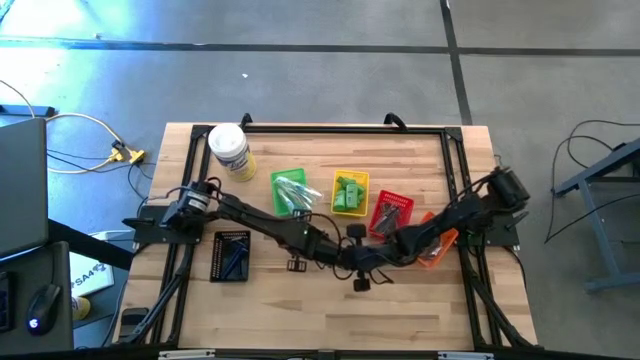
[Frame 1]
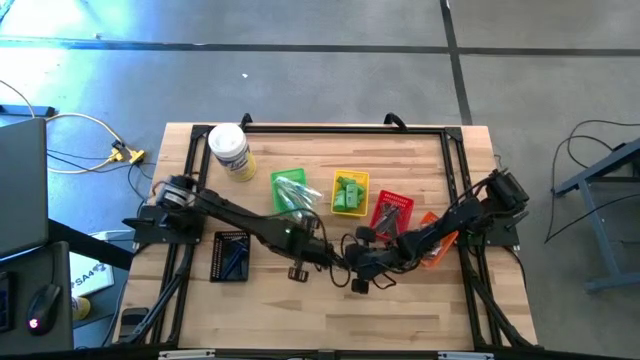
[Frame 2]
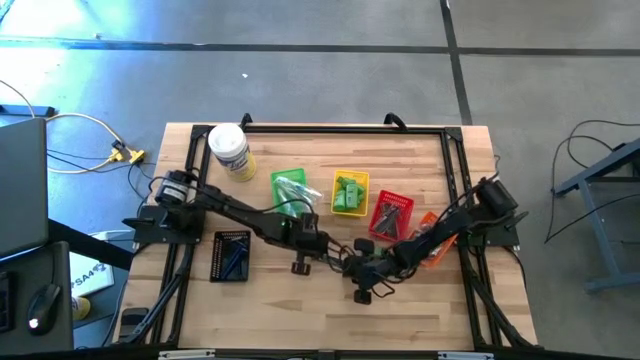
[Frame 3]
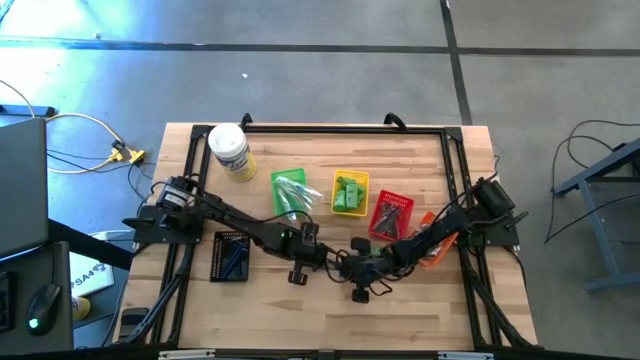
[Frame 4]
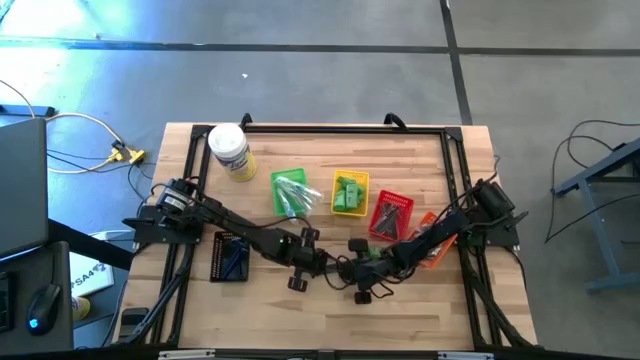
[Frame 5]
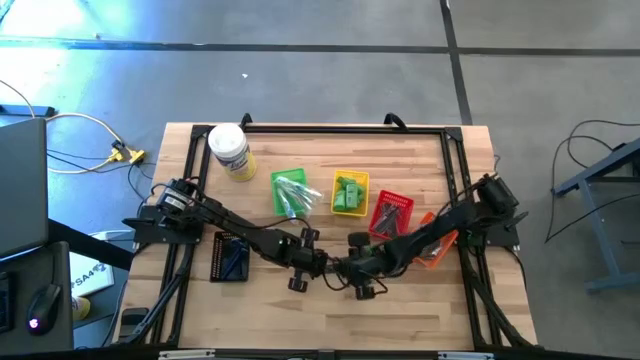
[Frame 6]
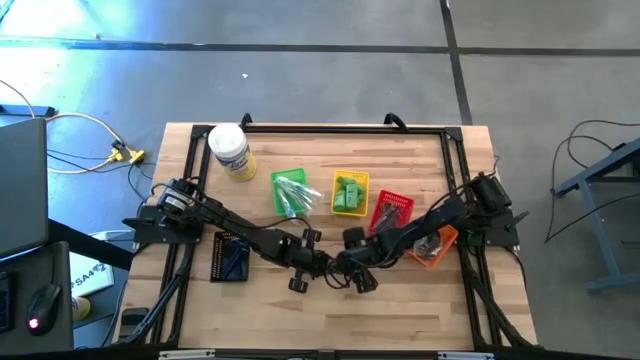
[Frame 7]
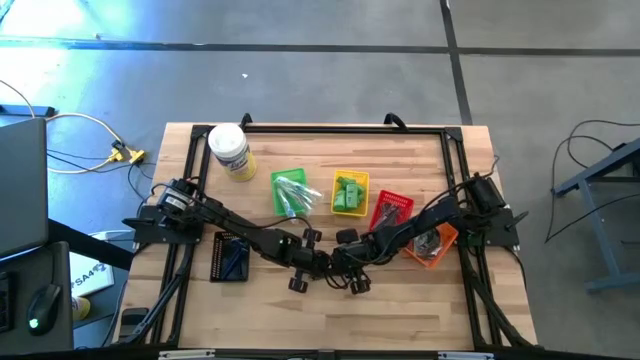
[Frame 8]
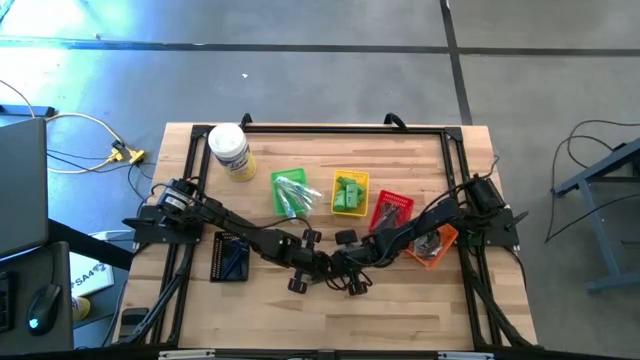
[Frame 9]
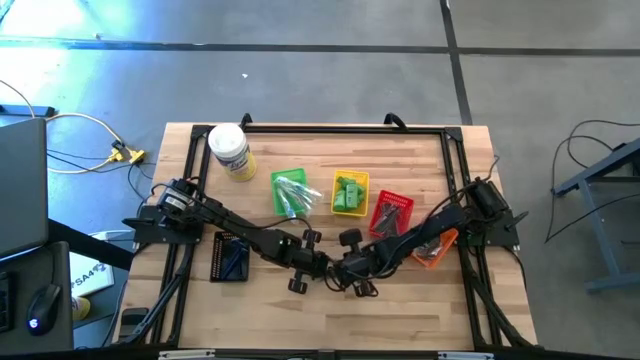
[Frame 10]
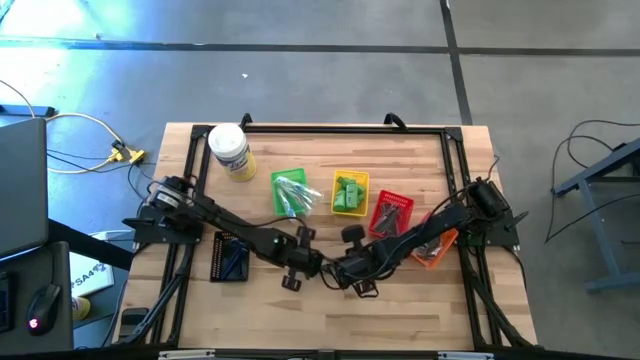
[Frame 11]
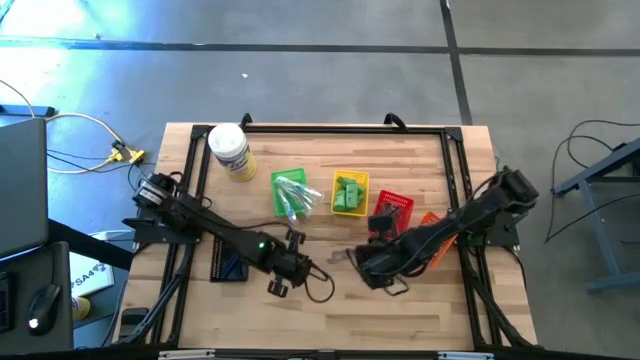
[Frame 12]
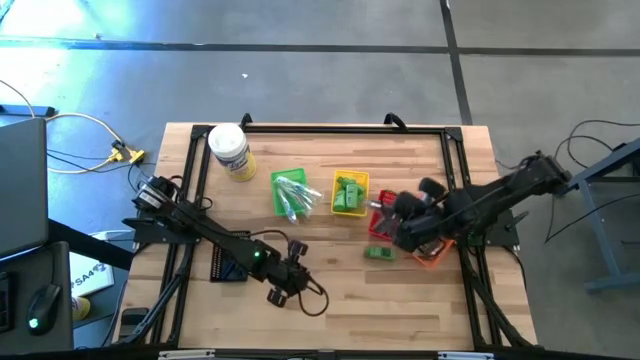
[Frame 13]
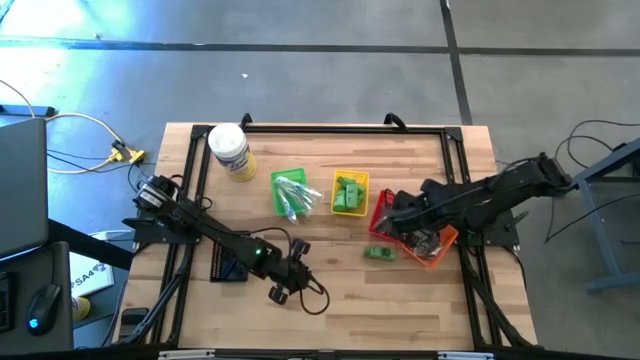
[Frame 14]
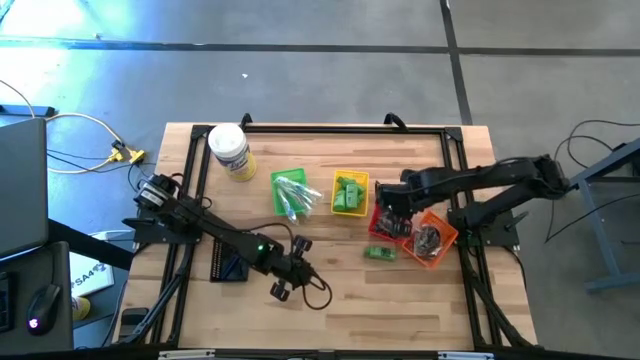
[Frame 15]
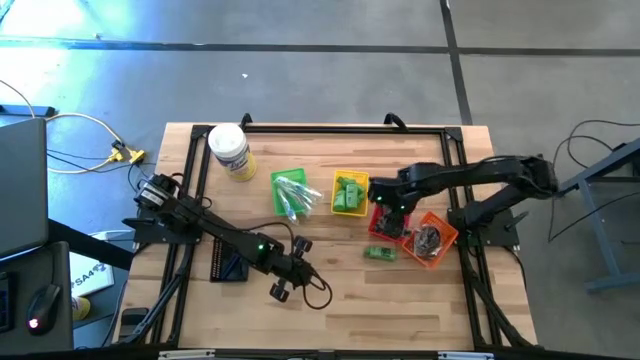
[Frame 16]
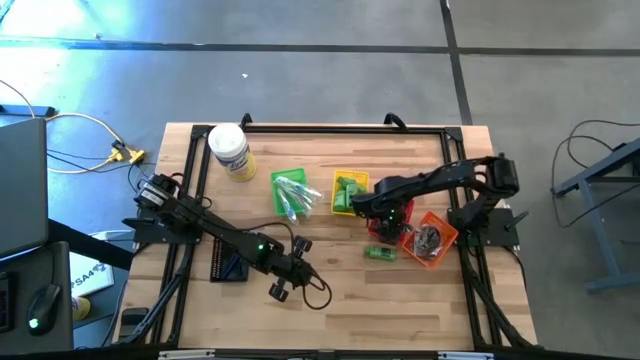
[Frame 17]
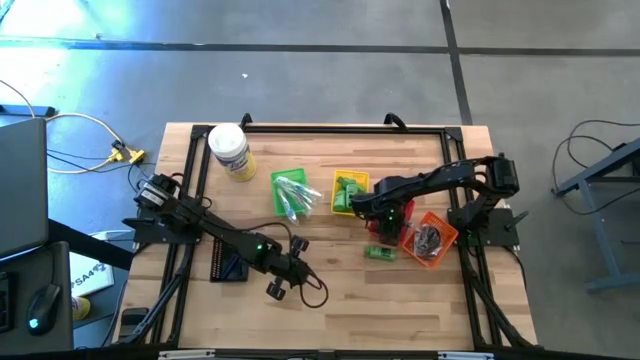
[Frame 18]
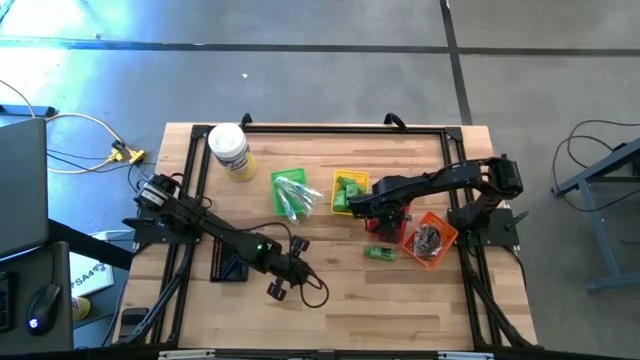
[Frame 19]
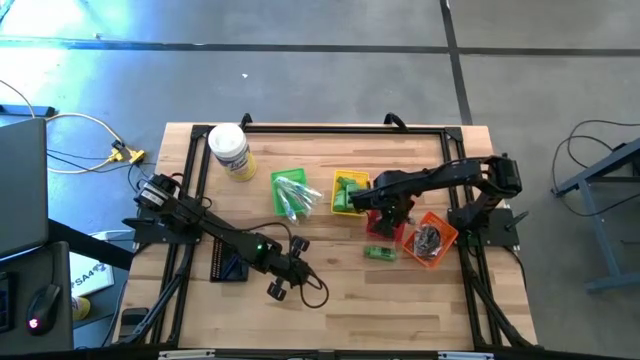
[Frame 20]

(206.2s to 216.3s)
Task: Pick & Place Travel size toiletries
Put the black hair comb into the red bin

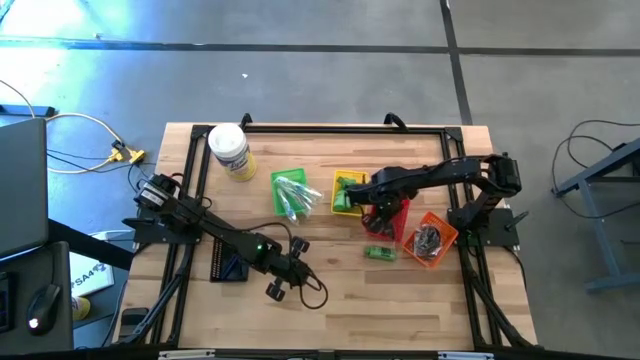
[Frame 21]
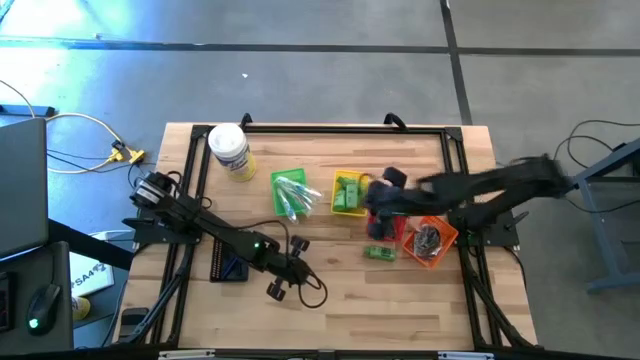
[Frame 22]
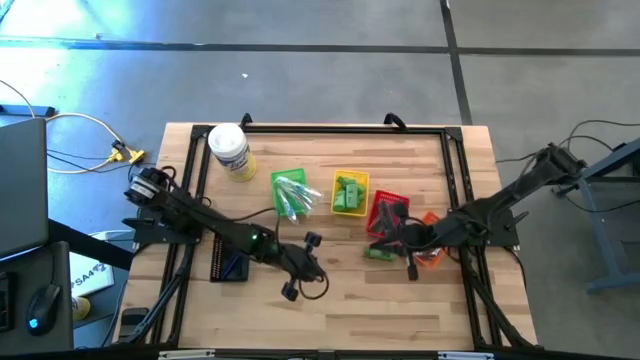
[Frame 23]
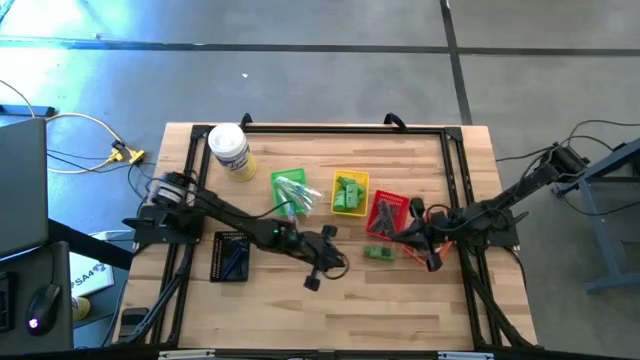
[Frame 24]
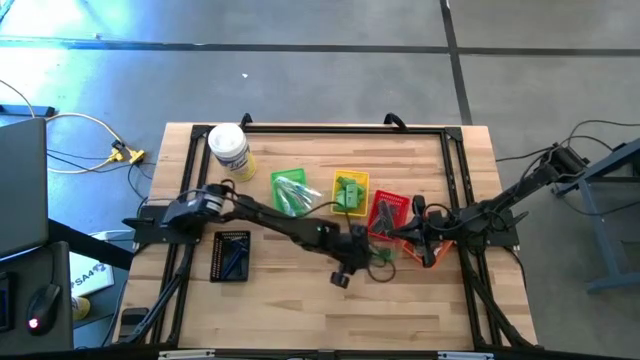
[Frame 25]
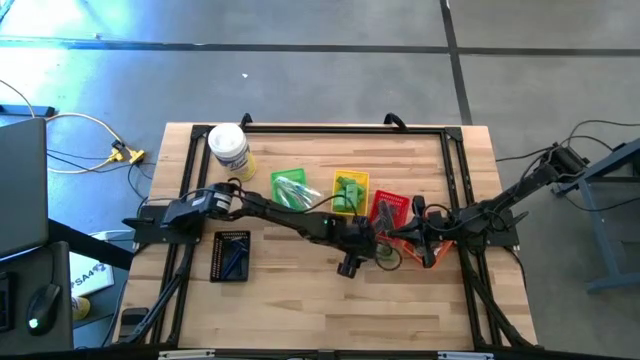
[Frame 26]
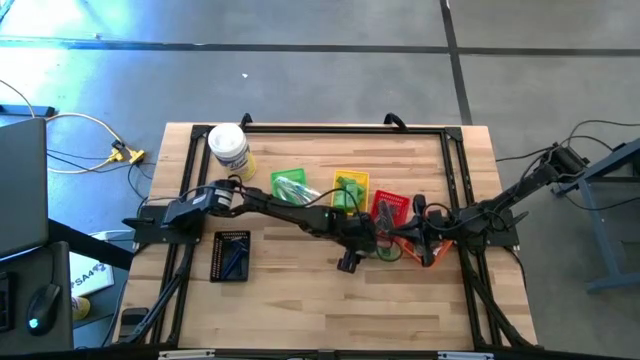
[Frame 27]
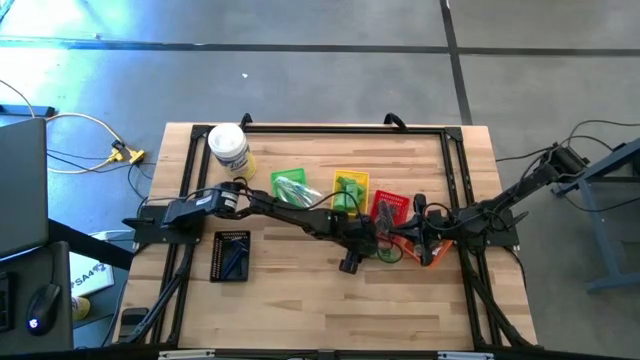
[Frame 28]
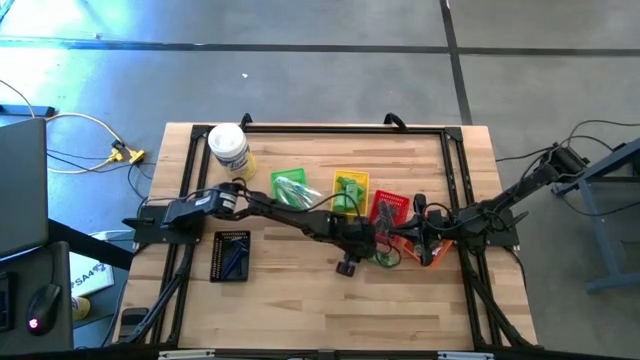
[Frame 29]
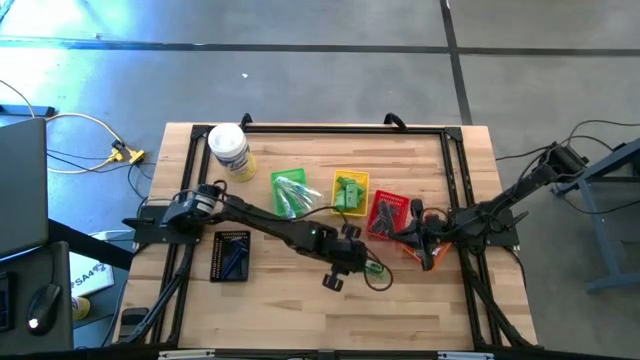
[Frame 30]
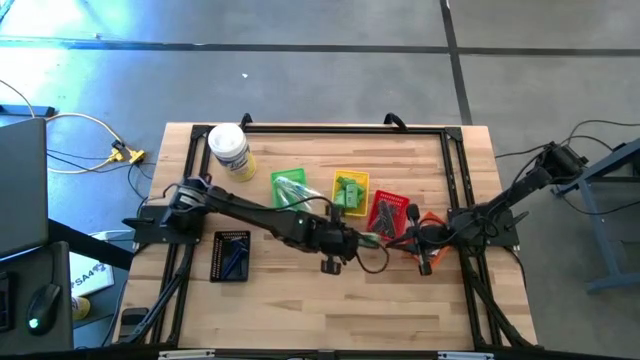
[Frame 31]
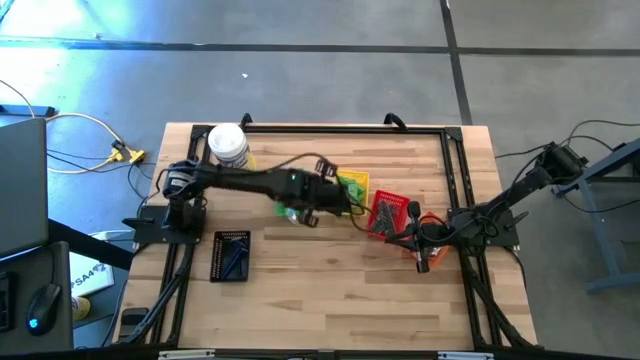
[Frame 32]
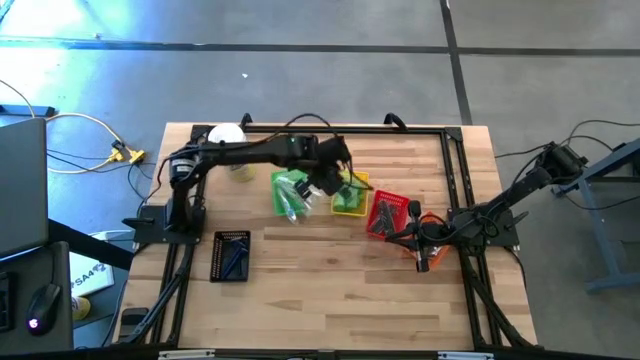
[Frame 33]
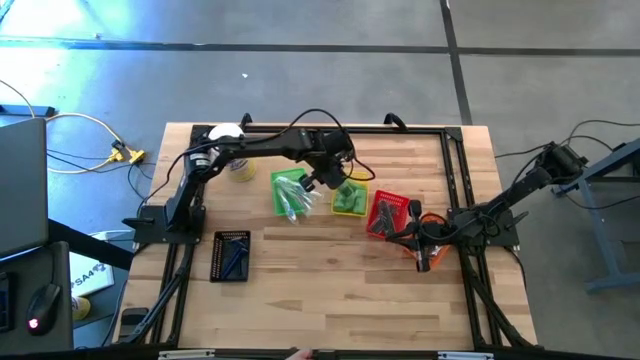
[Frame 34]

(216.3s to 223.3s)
Put the green shampoo into the yellow bin

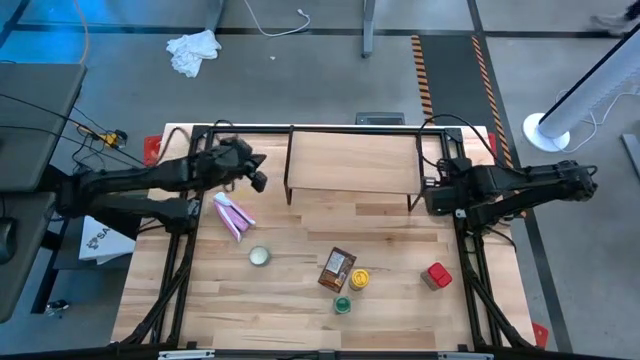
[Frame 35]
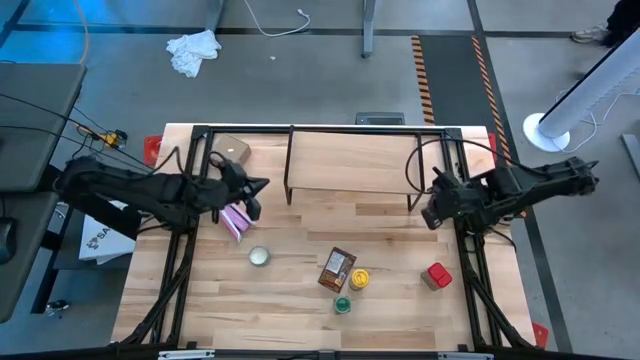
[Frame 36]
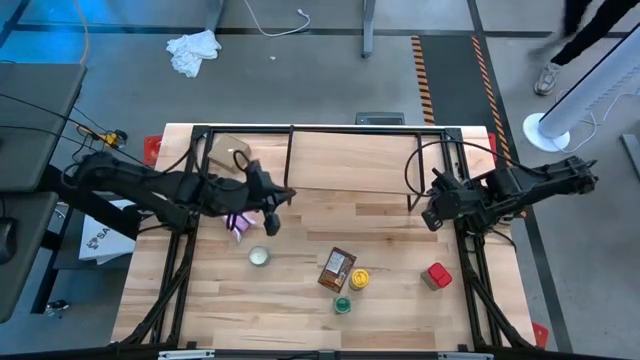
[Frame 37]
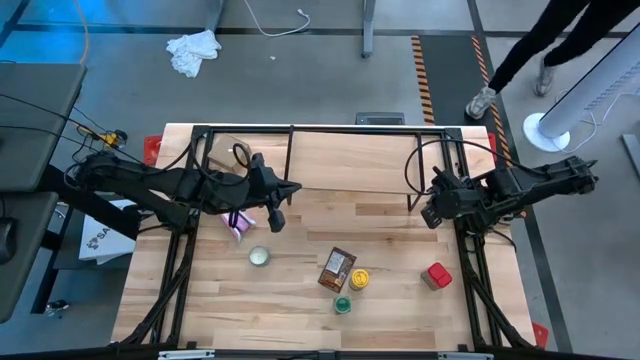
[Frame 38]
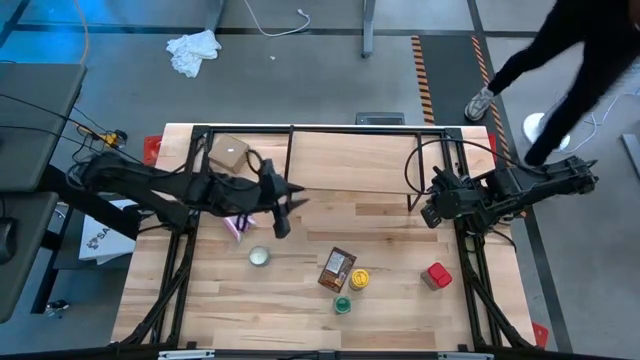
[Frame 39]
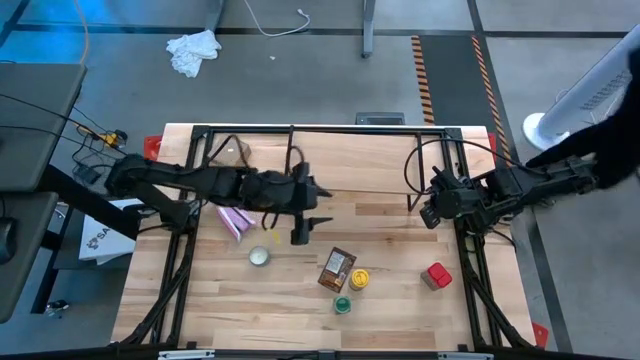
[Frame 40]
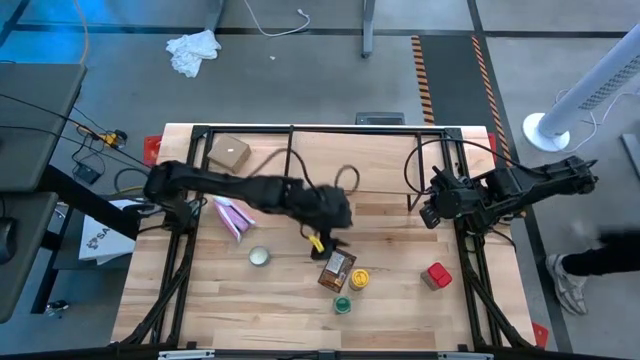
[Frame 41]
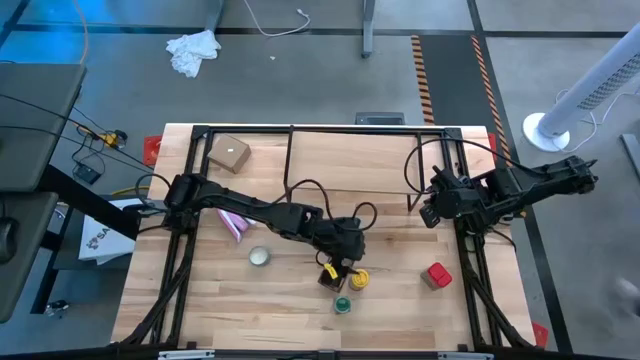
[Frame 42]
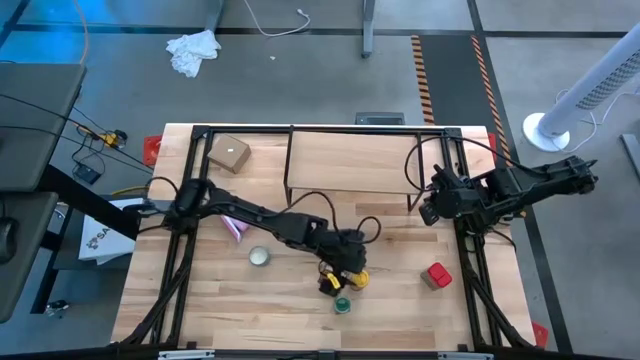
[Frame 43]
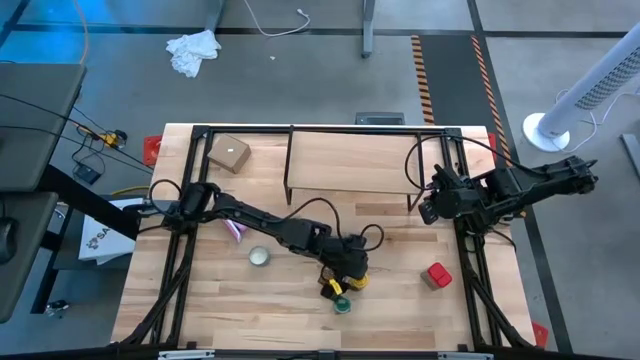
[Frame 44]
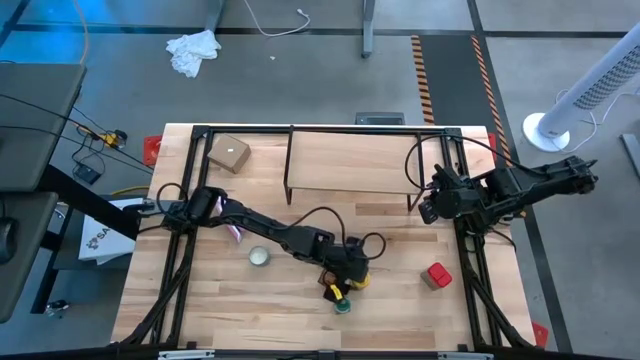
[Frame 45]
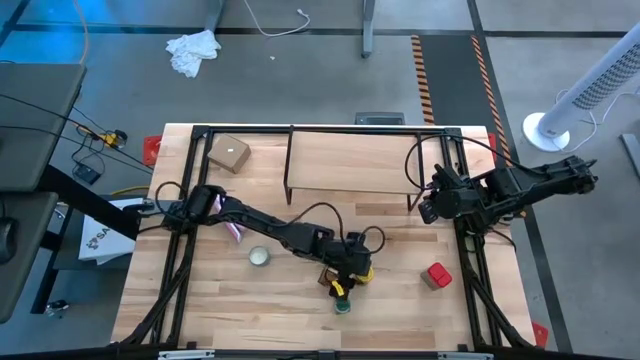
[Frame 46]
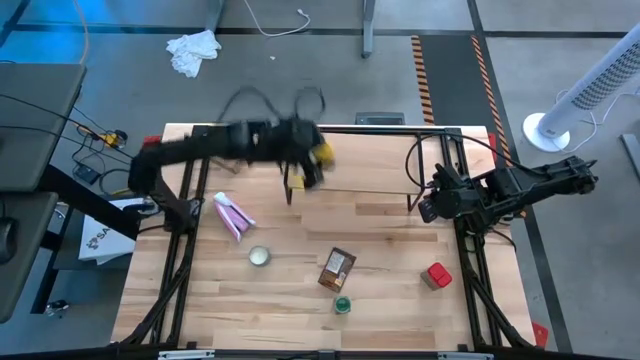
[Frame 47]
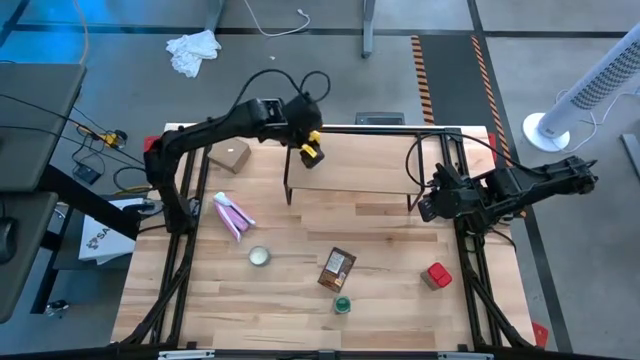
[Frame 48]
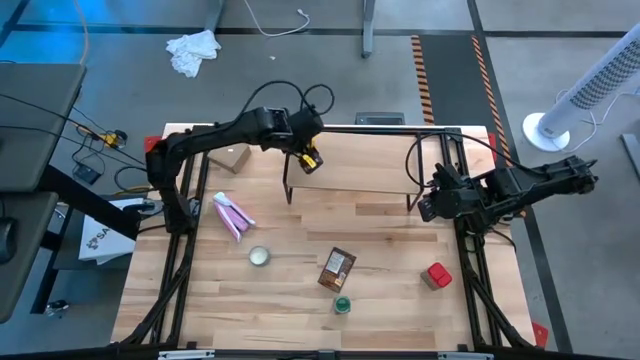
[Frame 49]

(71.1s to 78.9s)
Task: Shelf spices
Put the yellow spice bottle on the shelf
